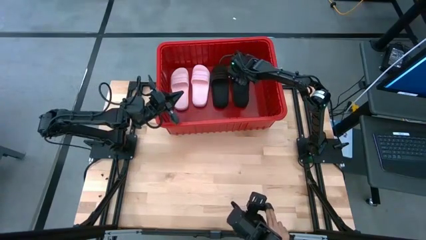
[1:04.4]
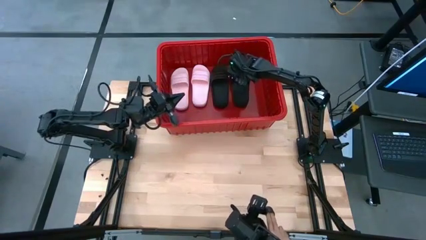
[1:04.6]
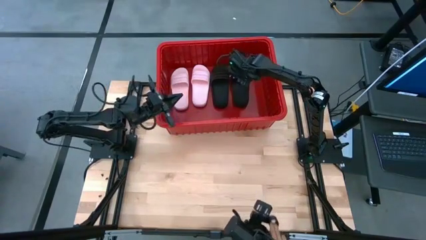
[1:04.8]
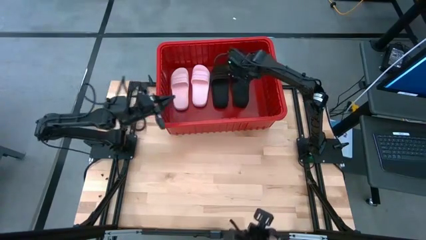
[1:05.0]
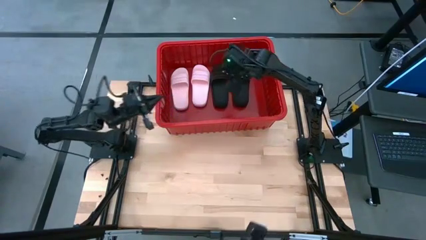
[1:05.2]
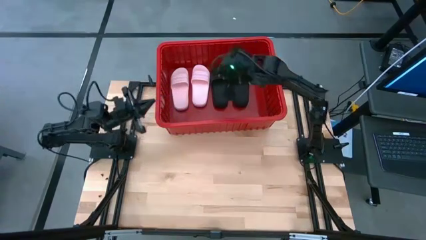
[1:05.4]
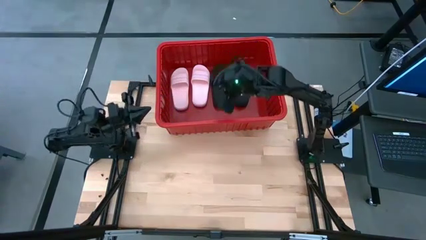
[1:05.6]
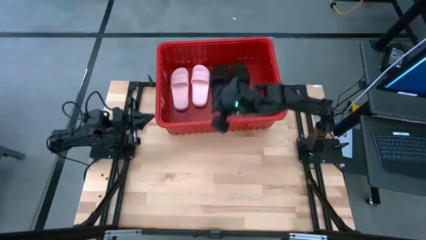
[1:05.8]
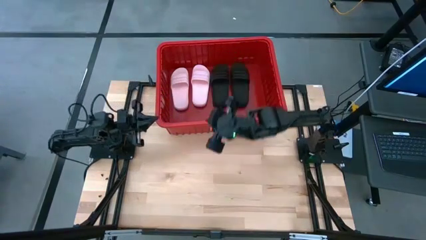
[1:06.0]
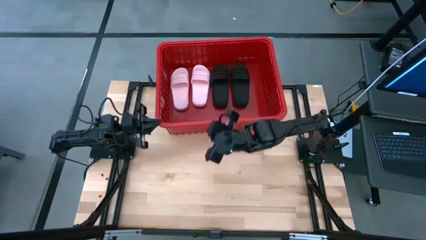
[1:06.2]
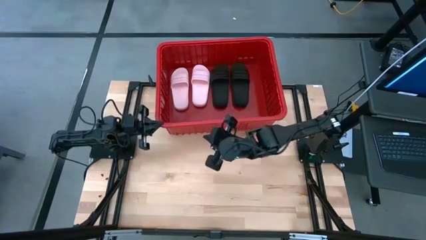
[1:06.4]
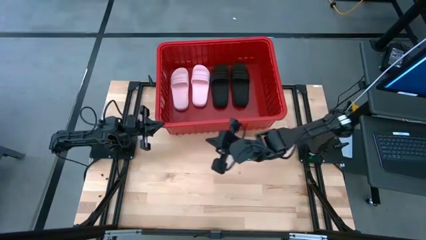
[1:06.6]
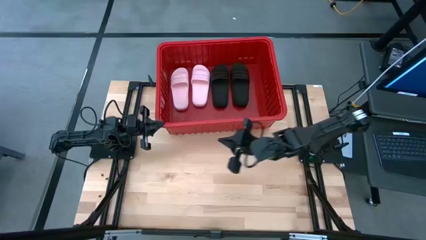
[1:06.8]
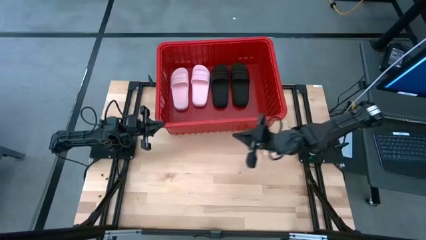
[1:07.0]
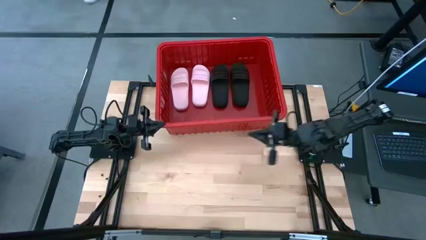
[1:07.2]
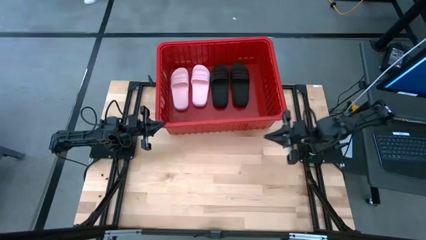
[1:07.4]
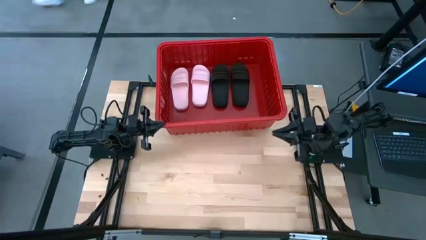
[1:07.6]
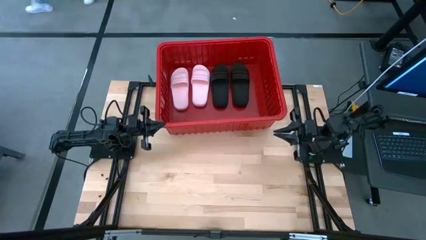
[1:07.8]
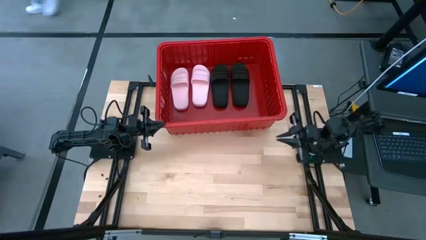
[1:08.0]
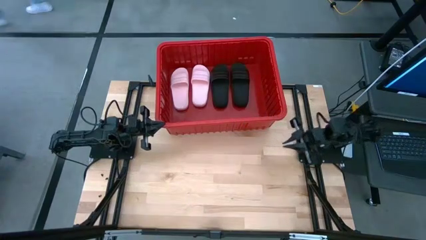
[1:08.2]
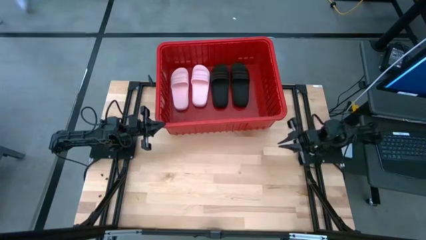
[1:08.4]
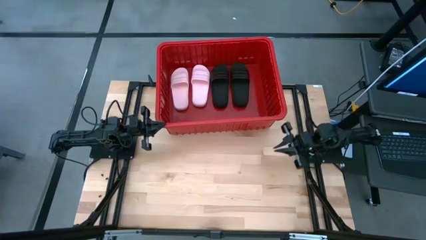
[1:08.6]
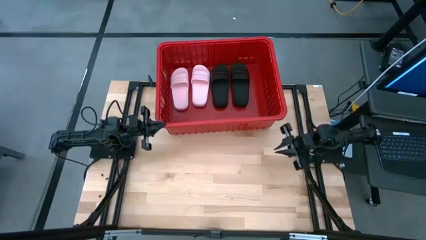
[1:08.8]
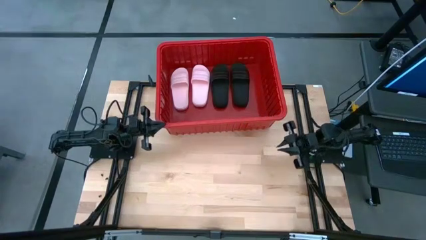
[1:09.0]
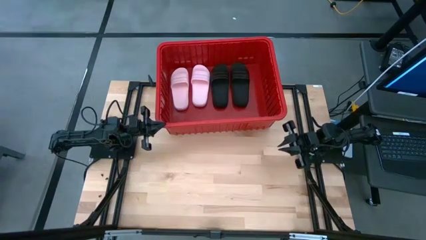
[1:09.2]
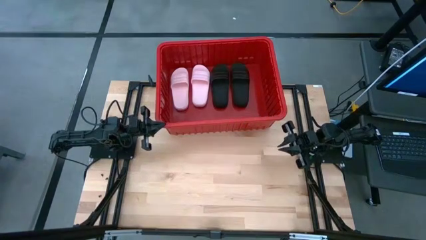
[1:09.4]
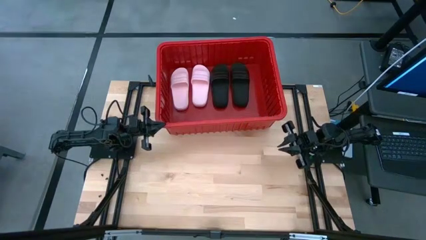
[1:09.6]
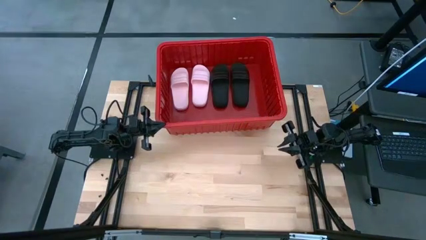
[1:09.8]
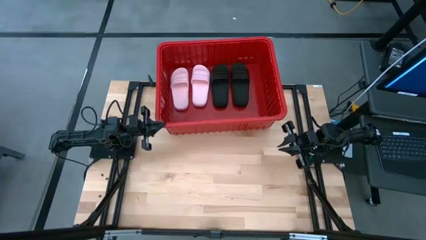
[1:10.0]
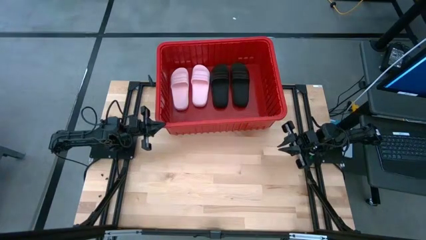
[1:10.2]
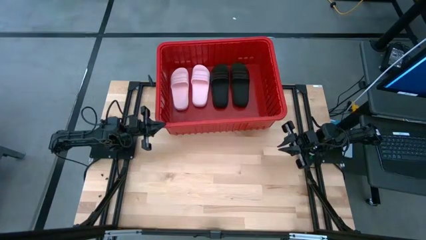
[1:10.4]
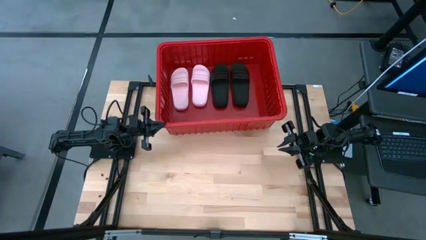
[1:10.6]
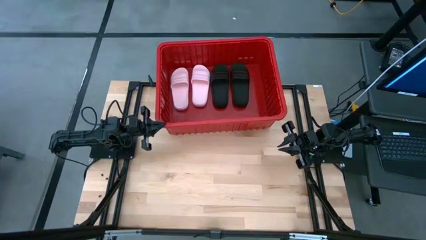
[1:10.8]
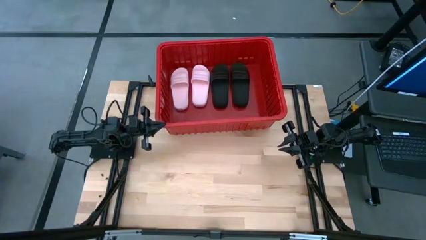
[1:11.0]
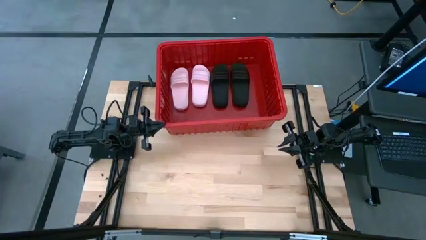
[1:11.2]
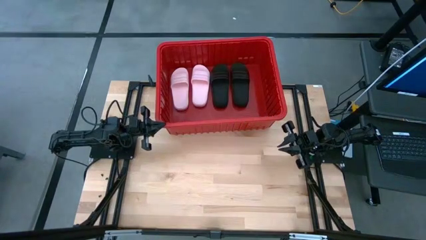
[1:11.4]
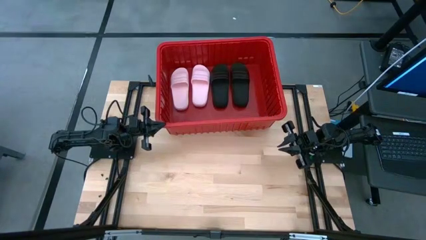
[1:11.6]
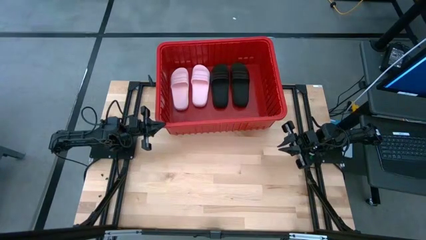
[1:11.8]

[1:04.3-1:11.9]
Task: Pick and place slides into bin
Return to Home Position

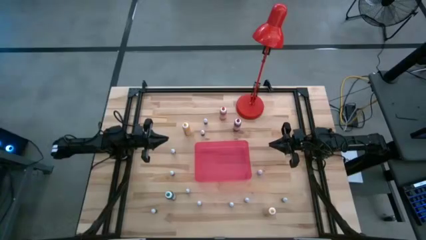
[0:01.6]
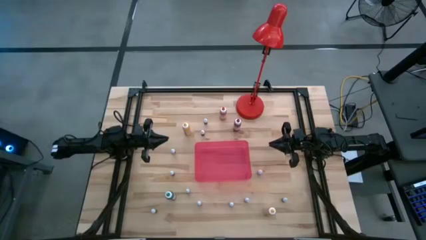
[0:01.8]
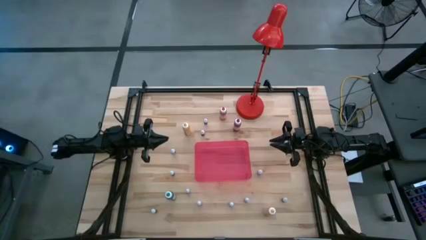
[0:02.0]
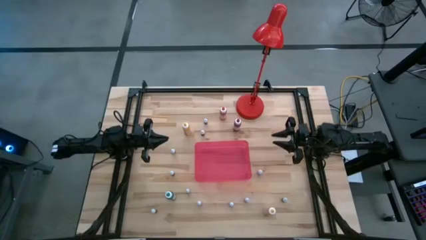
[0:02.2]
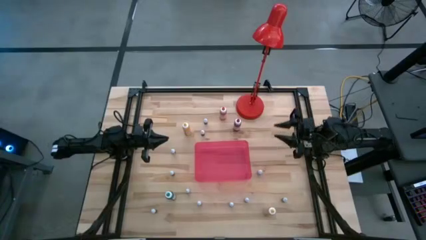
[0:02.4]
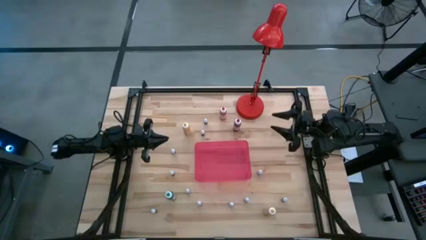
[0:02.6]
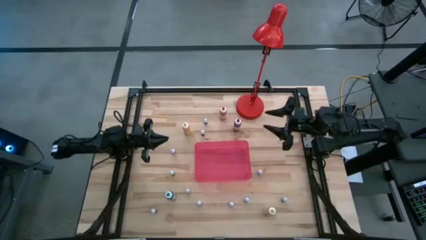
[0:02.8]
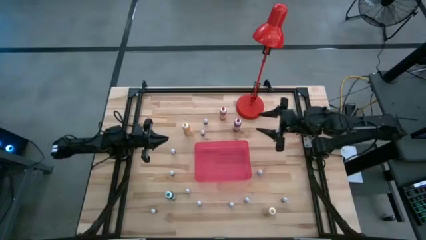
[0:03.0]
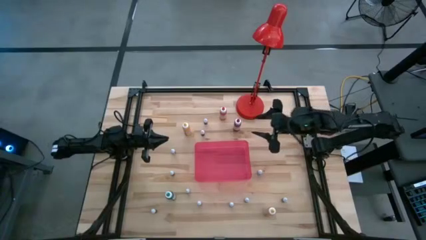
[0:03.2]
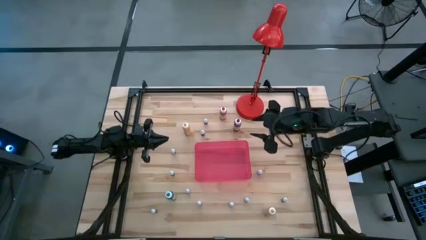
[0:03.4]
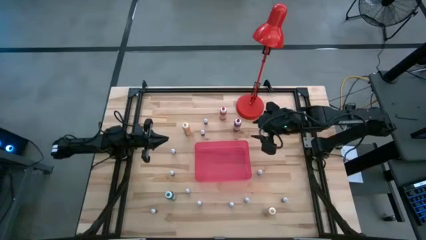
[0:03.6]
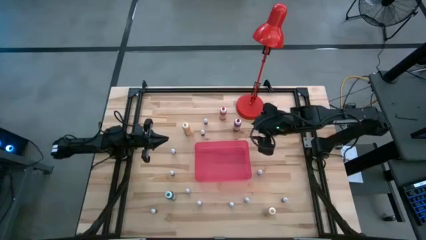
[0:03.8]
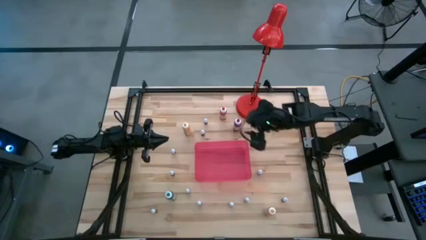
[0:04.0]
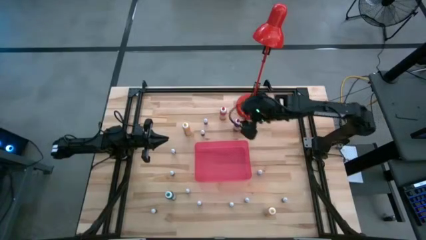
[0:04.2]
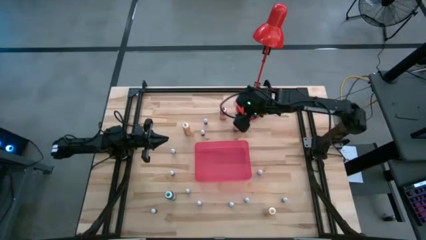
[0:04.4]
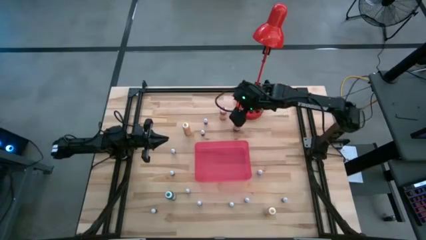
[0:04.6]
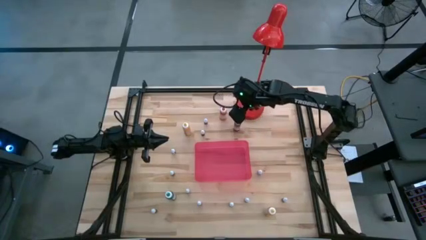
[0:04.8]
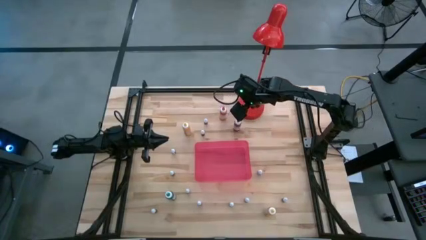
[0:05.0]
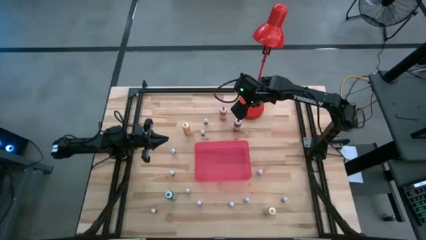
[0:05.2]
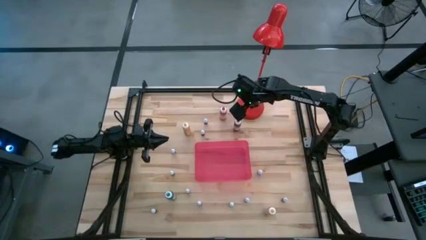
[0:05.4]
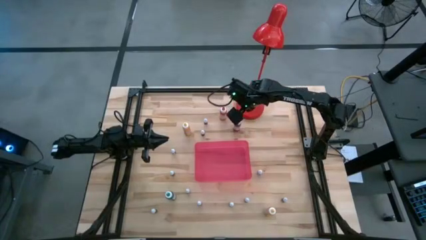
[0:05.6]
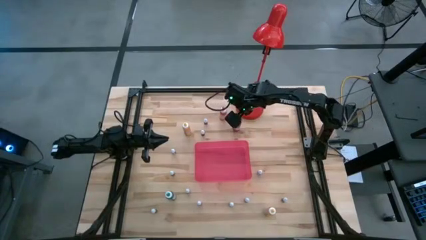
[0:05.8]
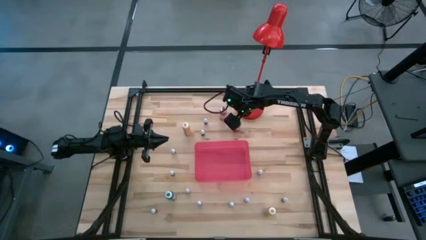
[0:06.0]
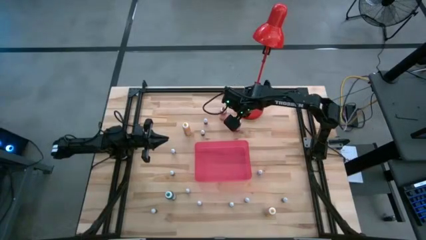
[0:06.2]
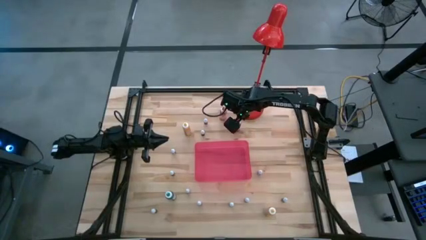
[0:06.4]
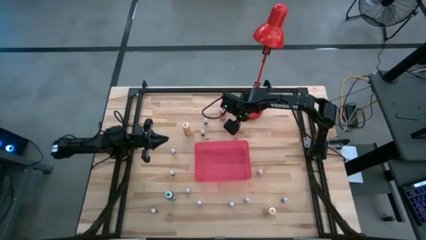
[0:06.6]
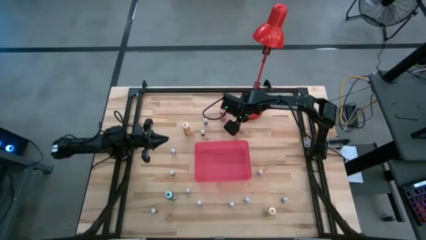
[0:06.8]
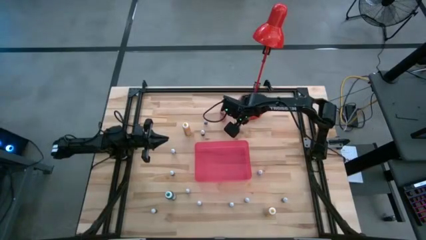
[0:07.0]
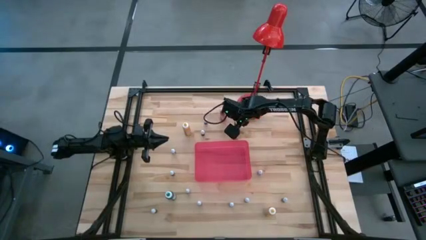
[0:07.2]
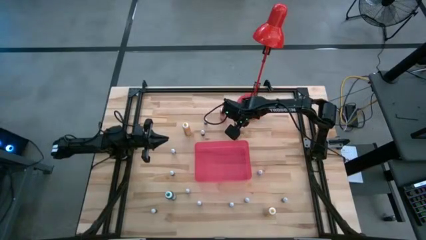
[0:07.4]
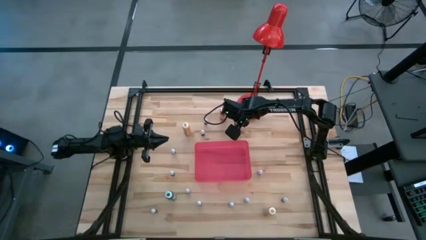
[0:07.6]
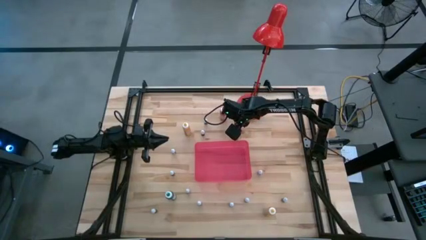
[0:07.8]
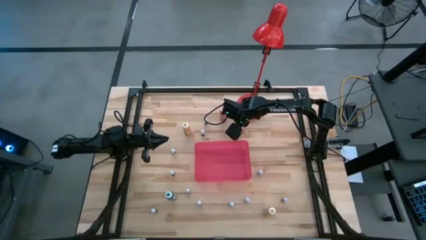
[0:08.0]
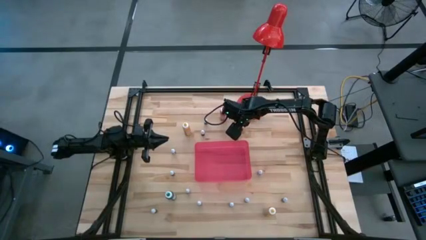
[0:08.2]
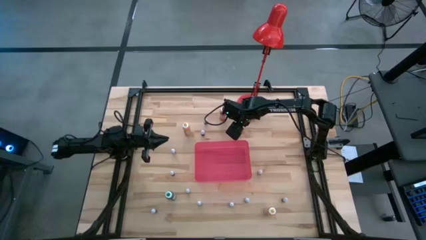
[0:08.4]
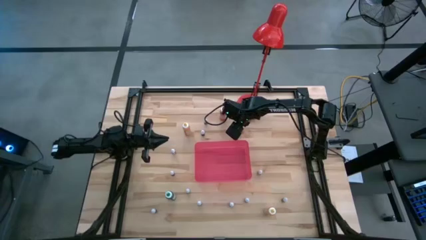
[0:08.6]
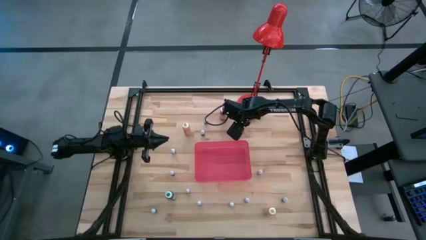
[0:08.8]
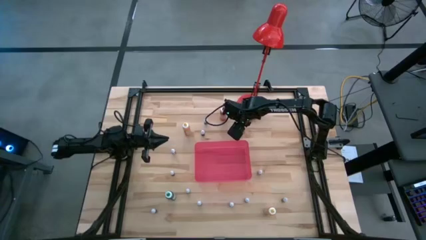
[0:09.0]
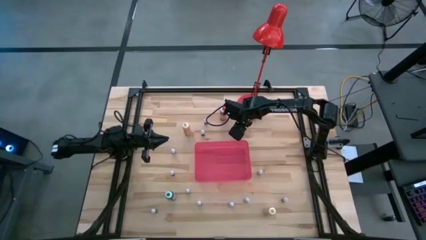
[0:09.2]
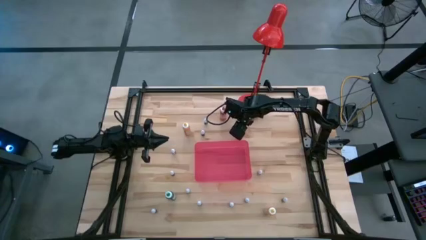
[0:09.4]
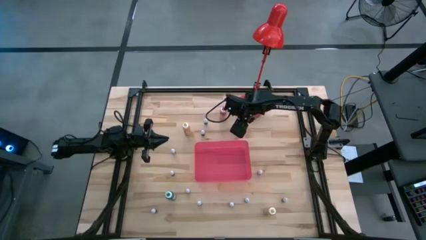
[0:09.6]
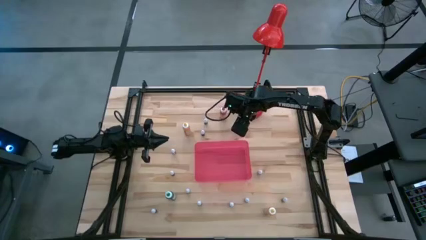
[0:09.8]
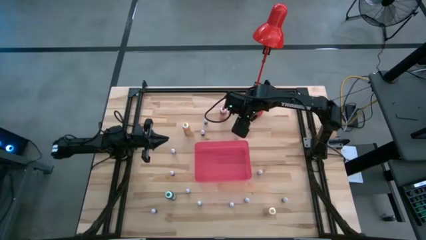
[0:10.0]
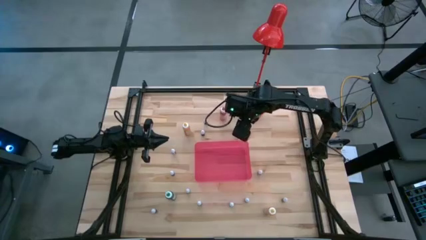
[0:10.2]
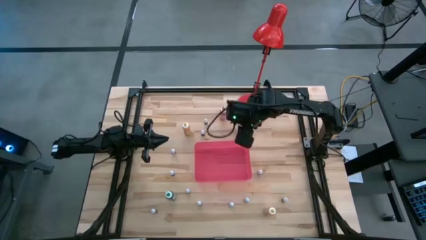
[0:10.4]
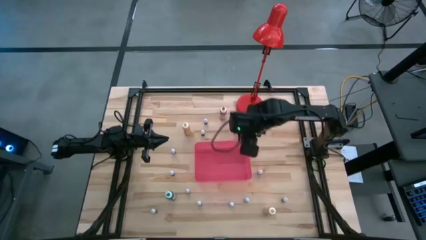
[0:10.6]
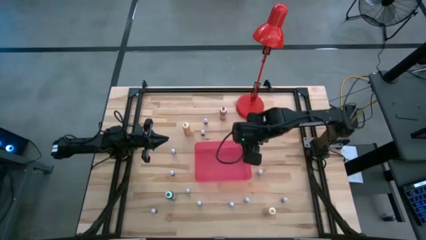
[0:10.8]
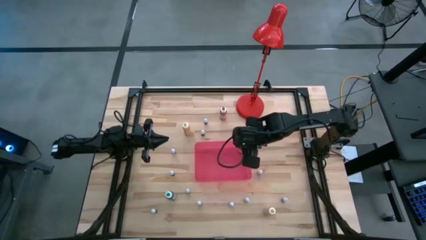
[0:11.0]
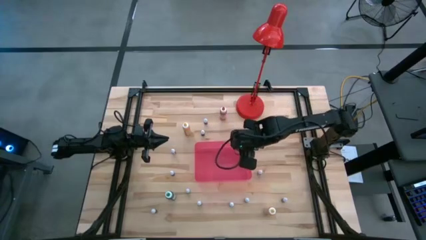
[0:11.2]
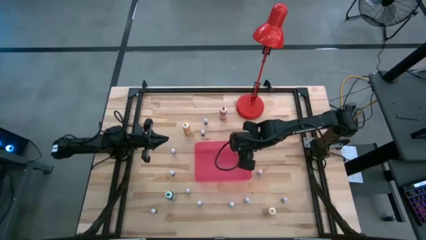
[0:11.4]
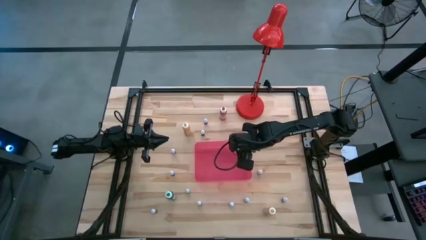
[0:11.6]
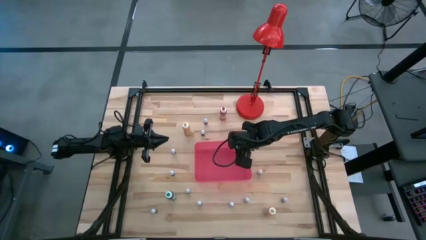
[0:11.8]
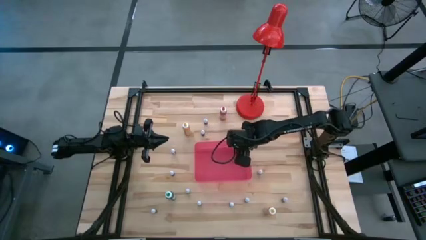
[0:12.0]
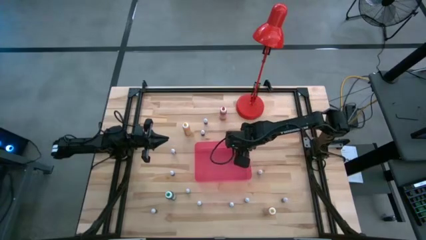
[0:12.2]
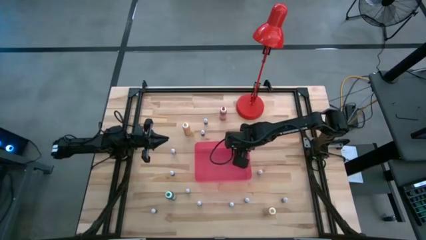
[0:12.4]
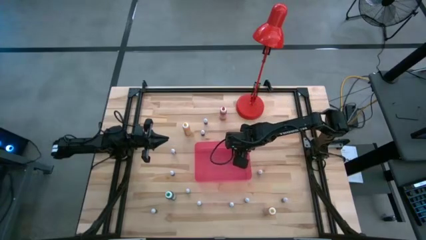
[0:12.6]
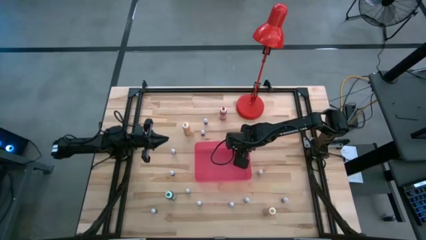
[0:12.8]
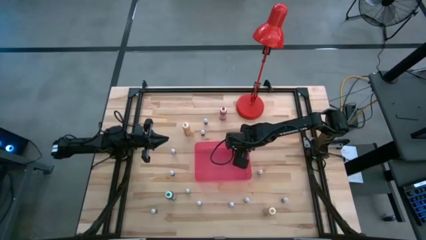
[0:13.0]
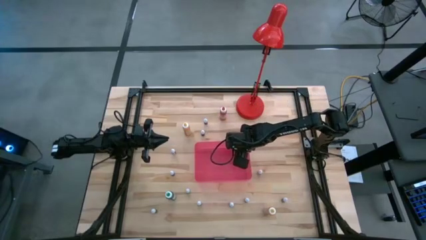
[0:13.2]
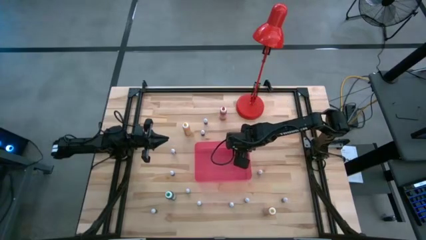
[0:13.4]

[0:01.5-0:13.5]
Task: Pick & Place food coloring
Put the large red food coloring bottle into the red bin
